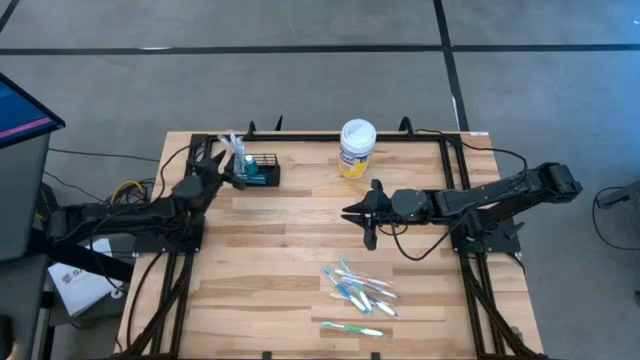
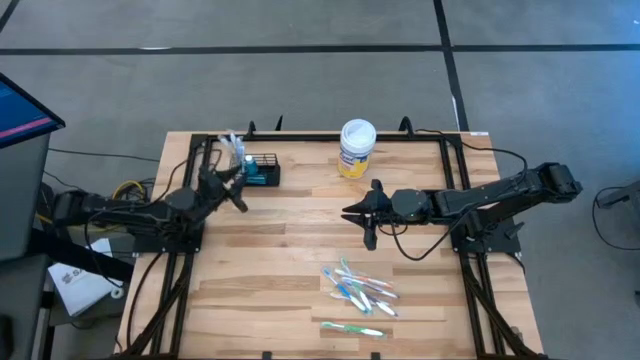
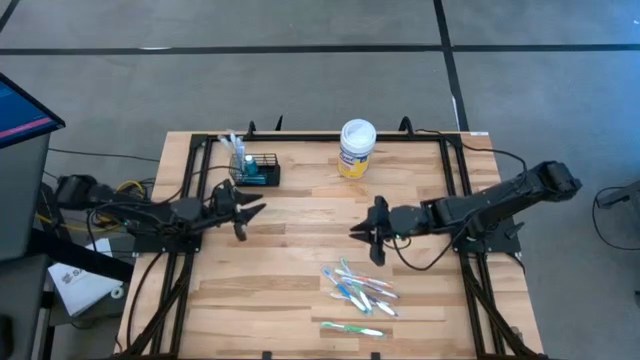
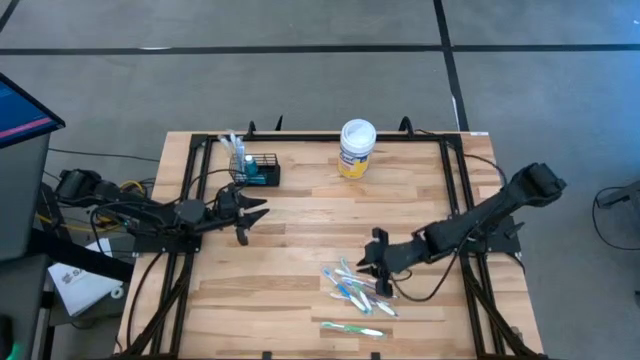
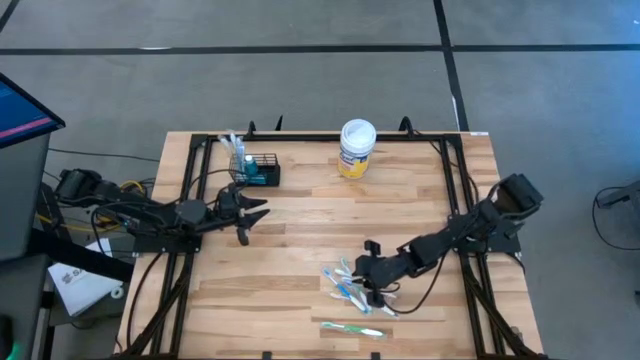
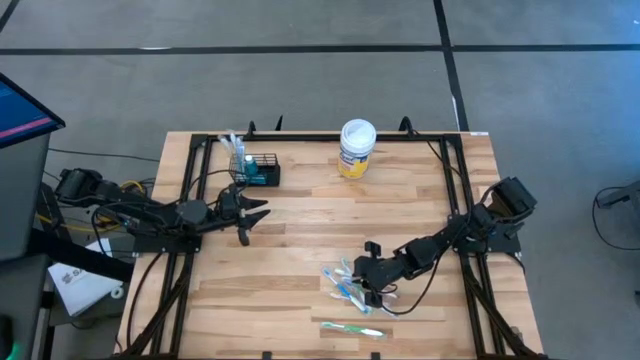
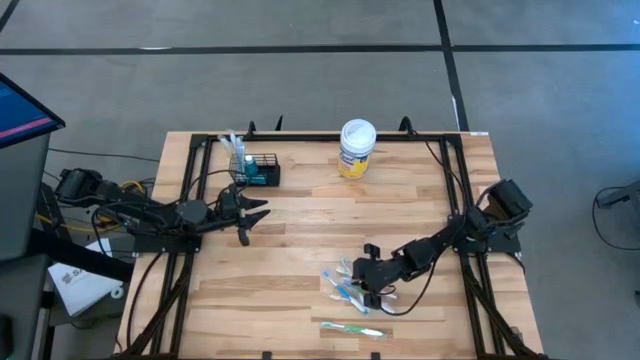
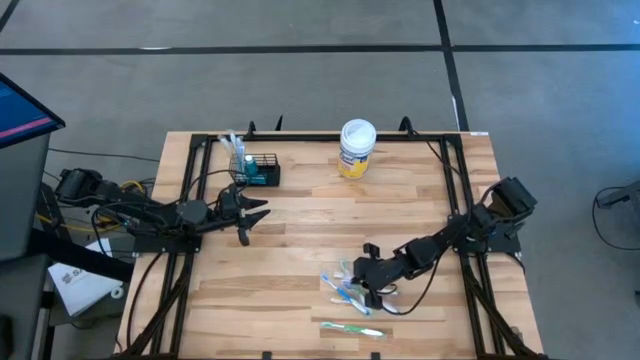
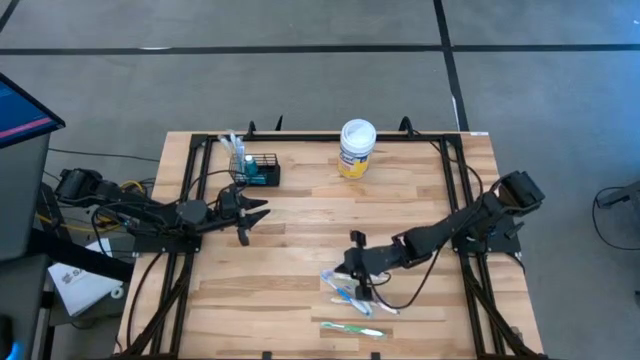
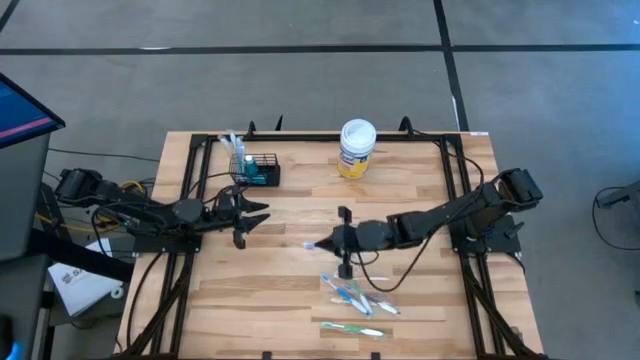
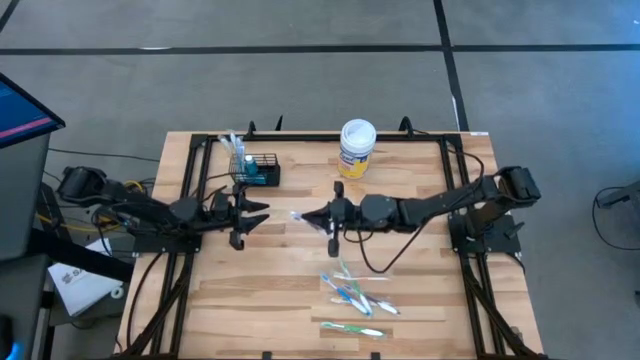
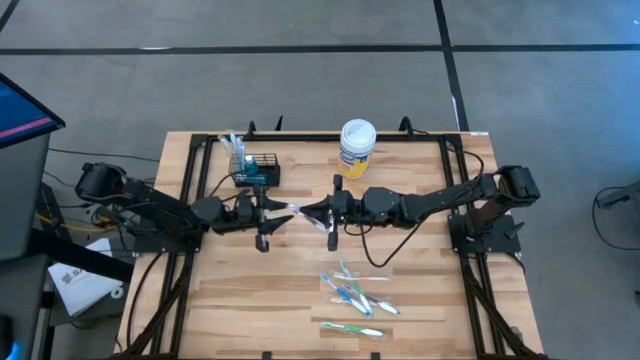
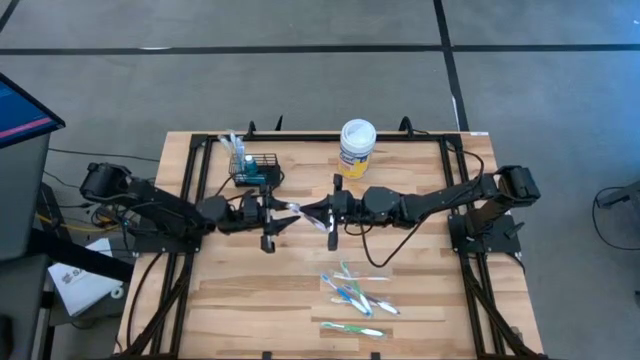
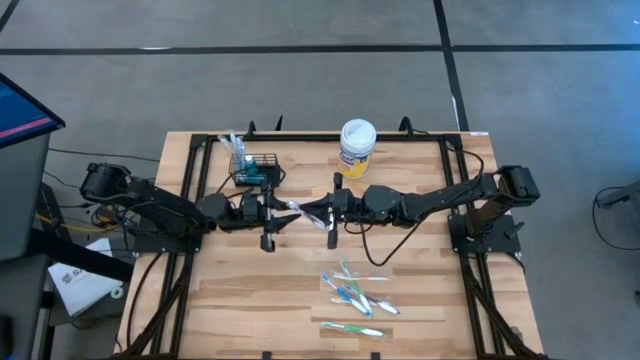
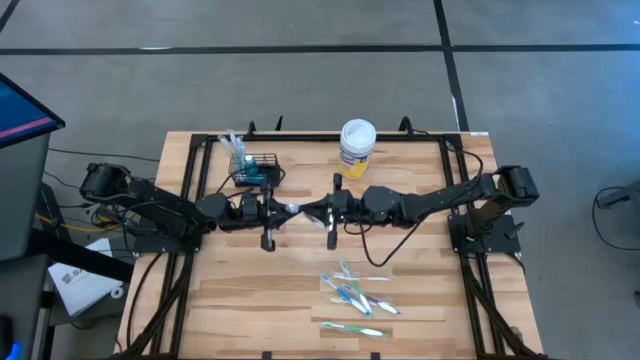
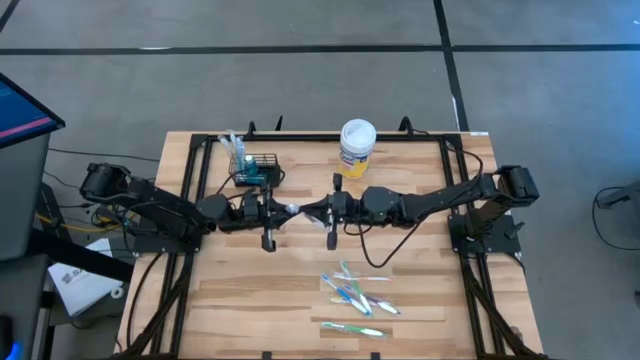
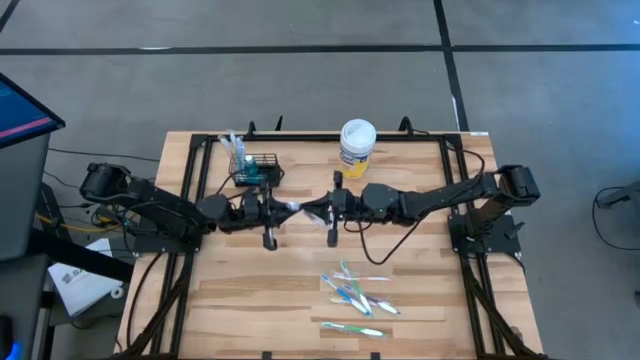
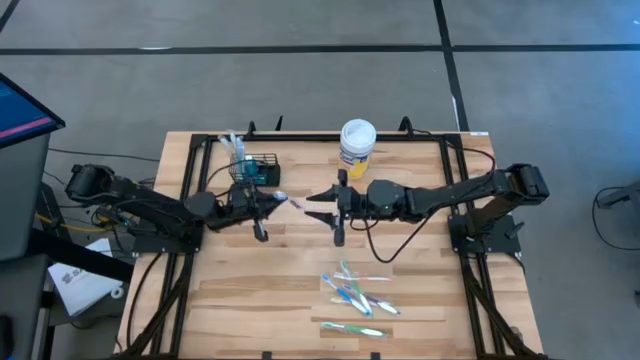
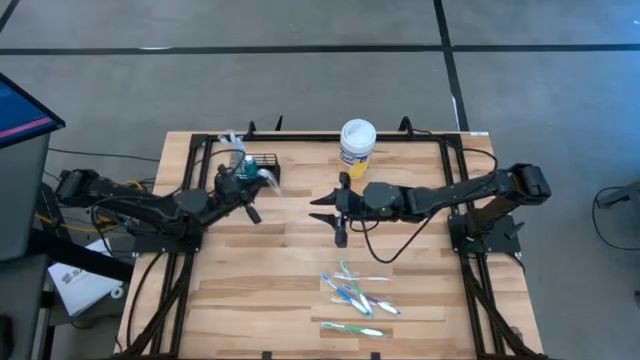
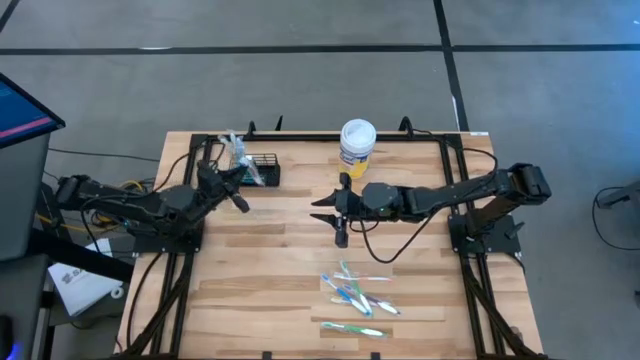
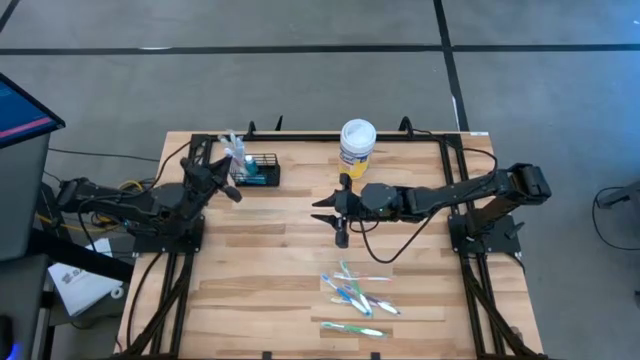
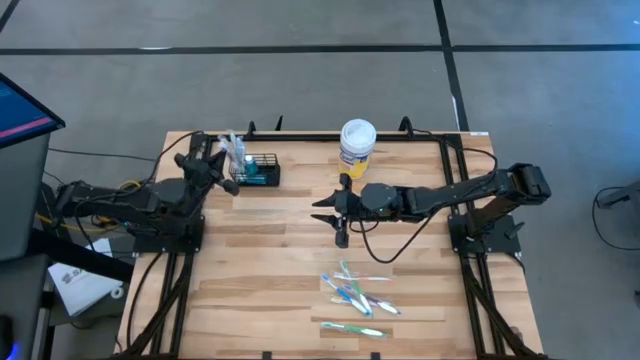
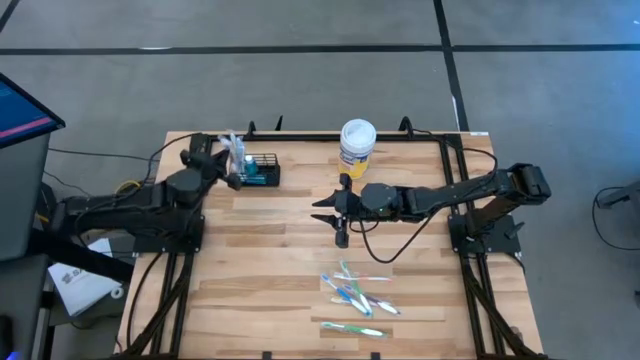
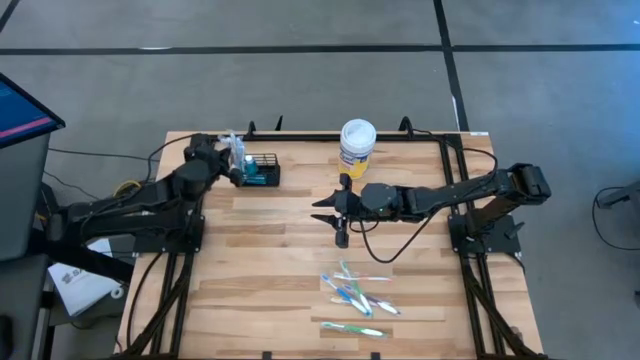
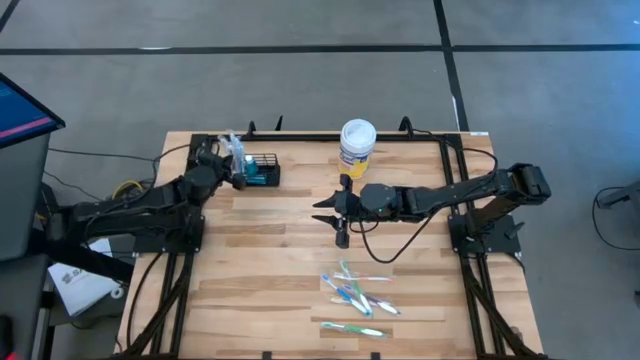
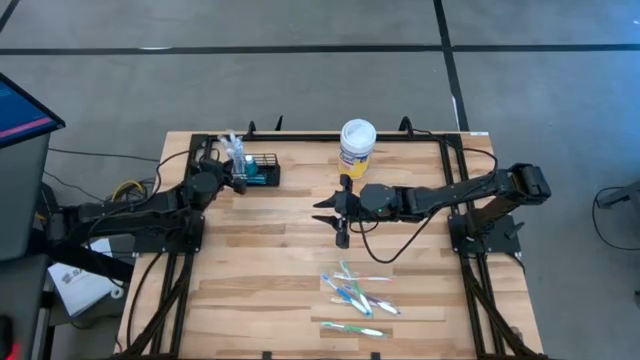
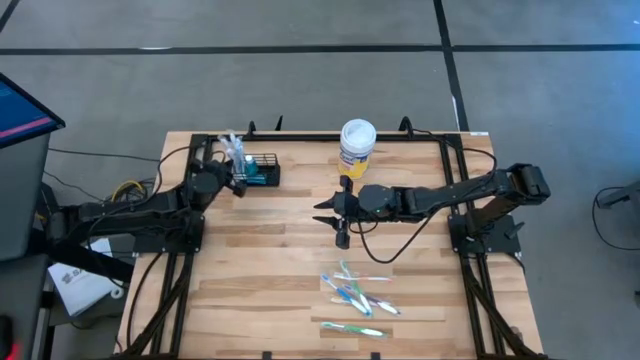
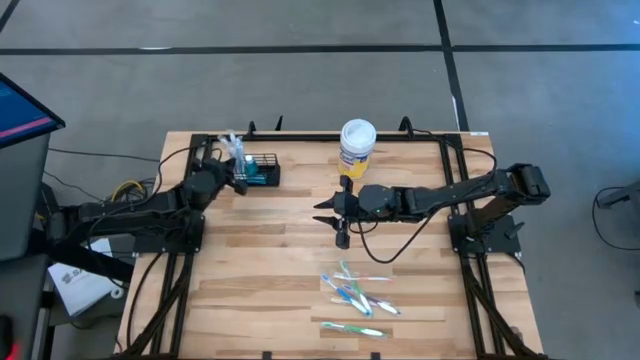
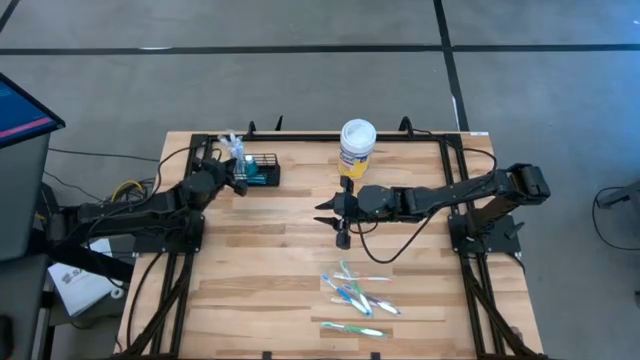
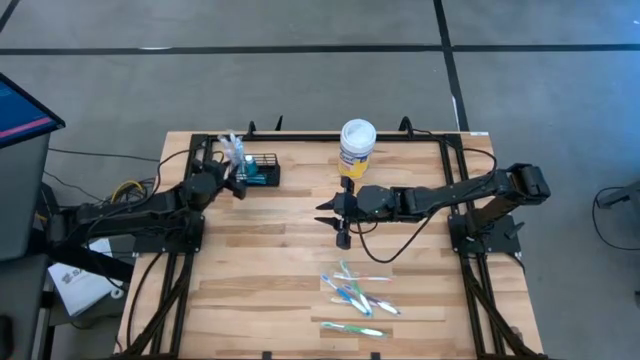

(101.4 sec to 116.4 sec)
Task: Pick & Place toothbrushing station
Put the top purple toothbrush into the mesh organizer

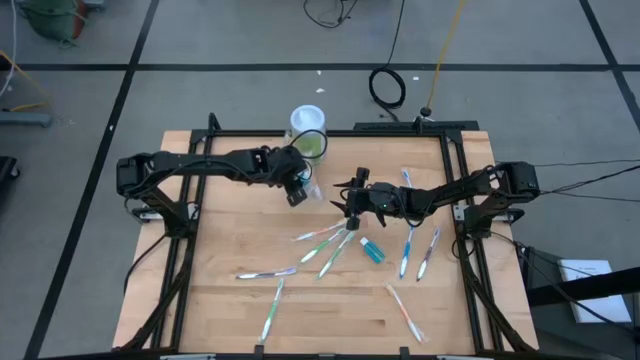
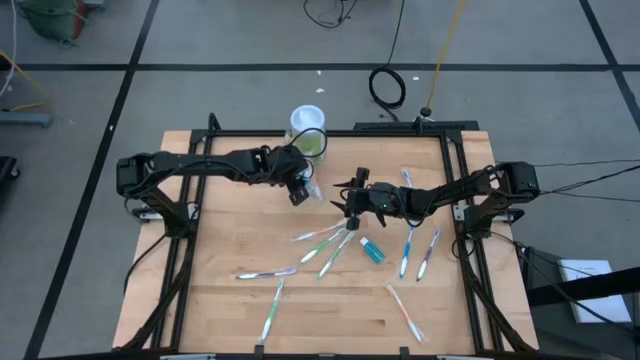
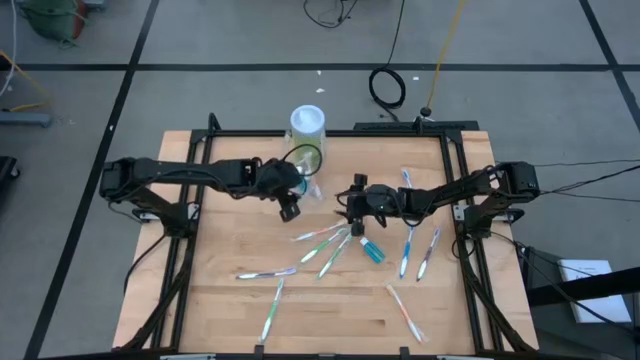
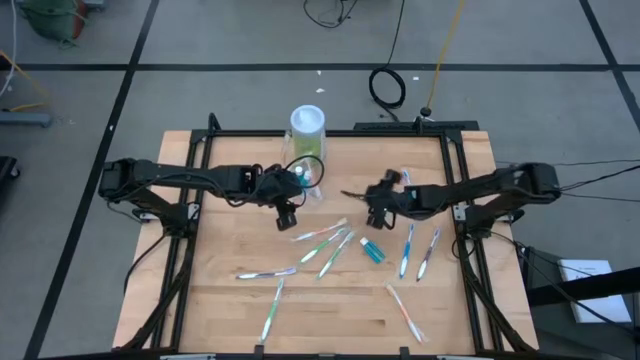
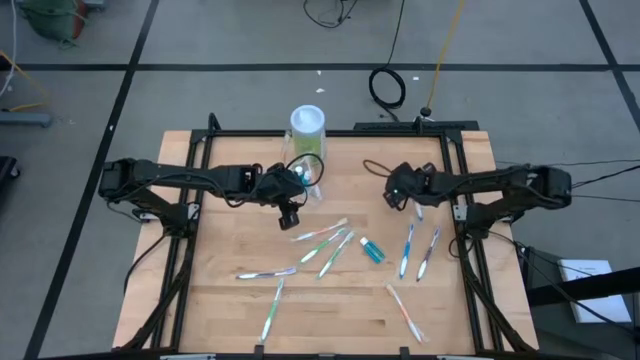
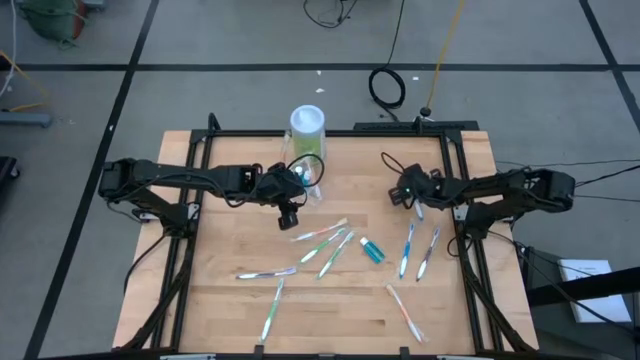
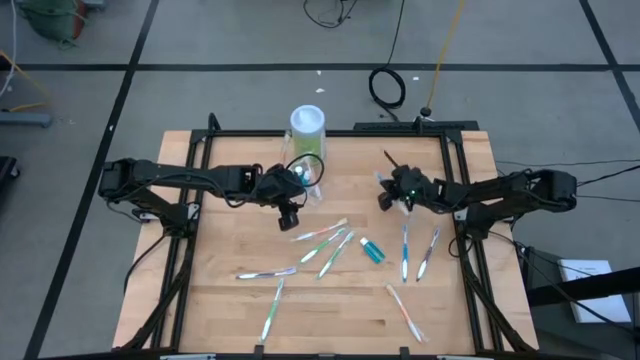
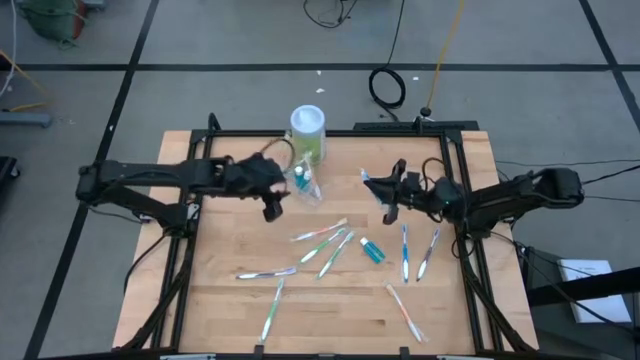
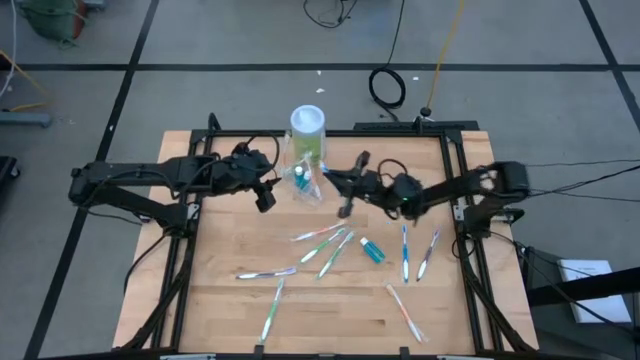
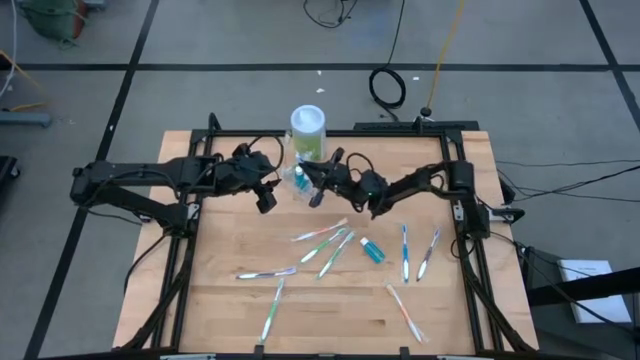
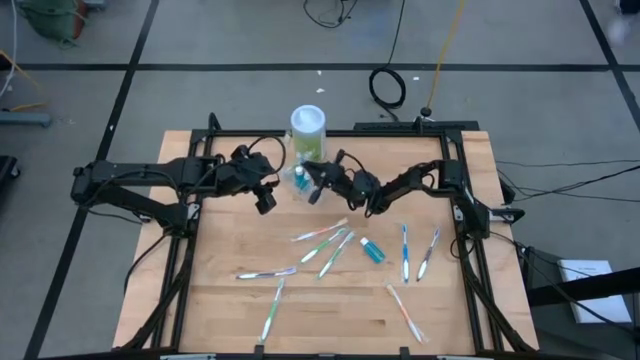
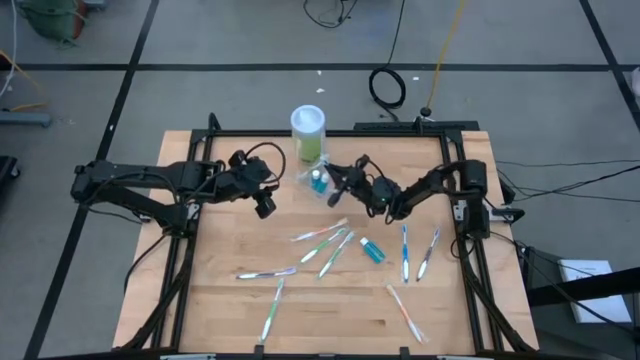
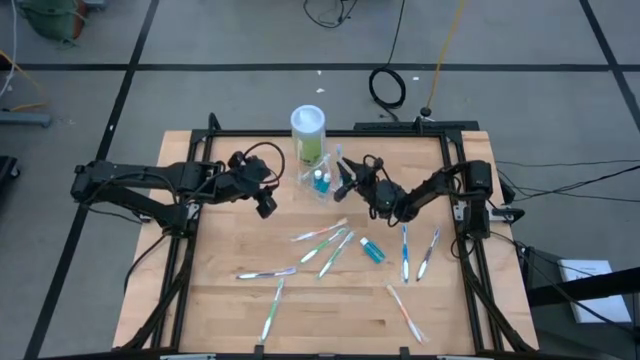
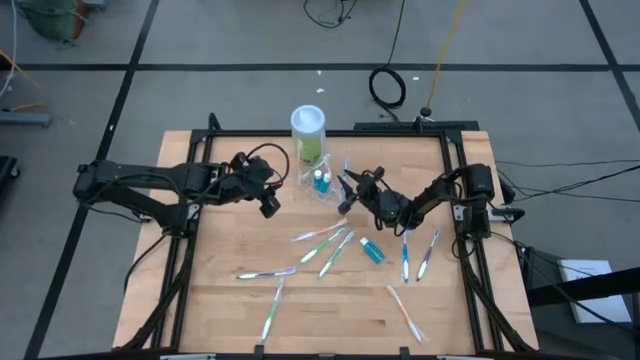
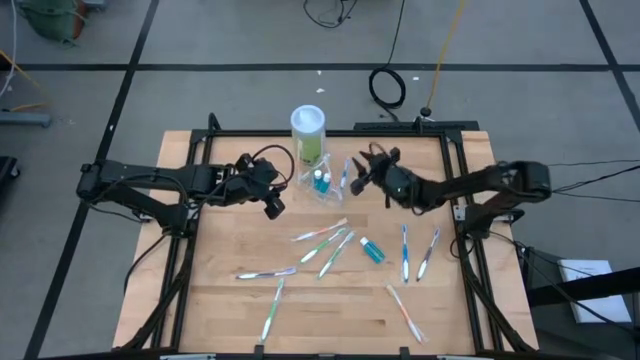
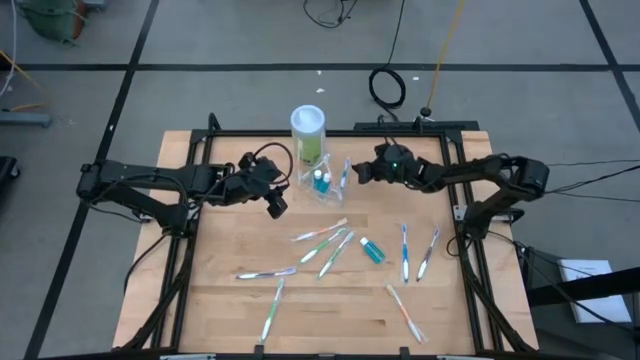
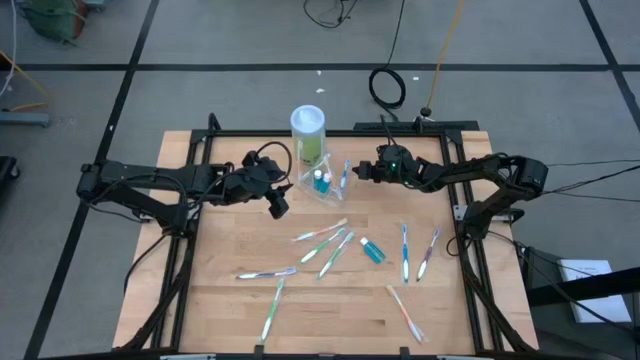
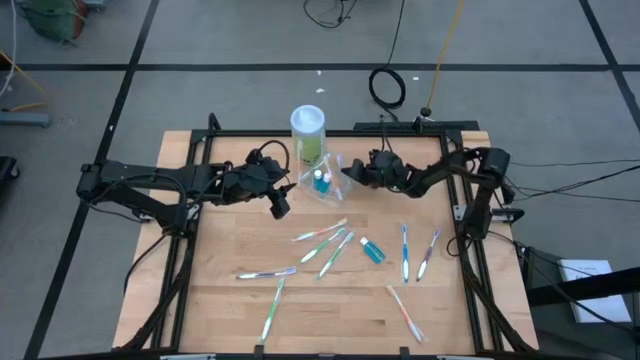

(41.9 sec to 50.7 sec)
Task: Pick & Place toothbrushing station
Put the blue toothbrush into the right of the transparent organizer
